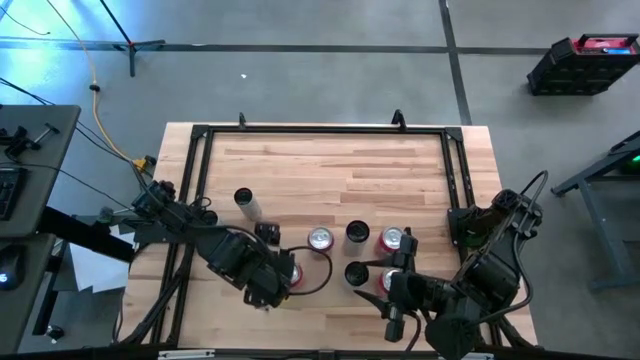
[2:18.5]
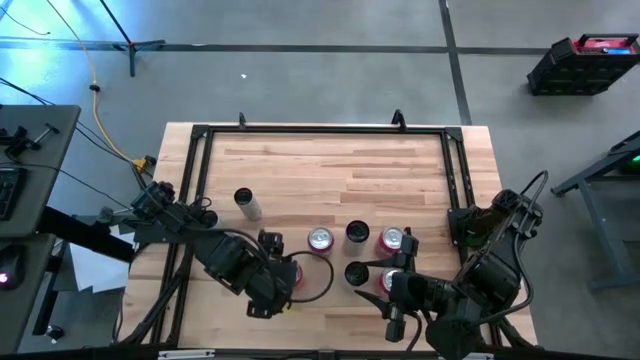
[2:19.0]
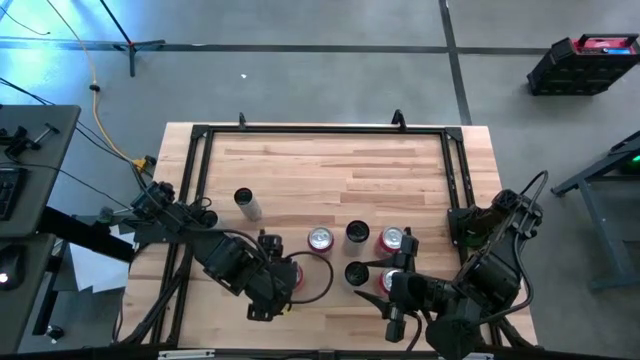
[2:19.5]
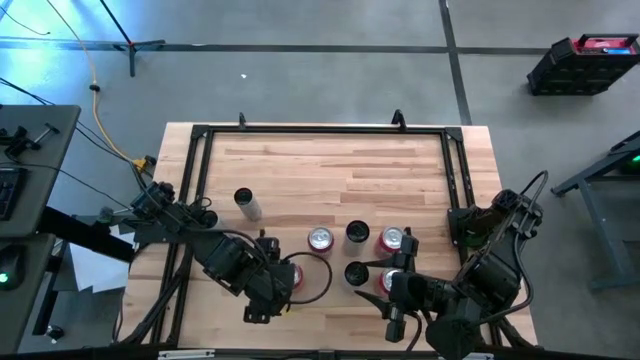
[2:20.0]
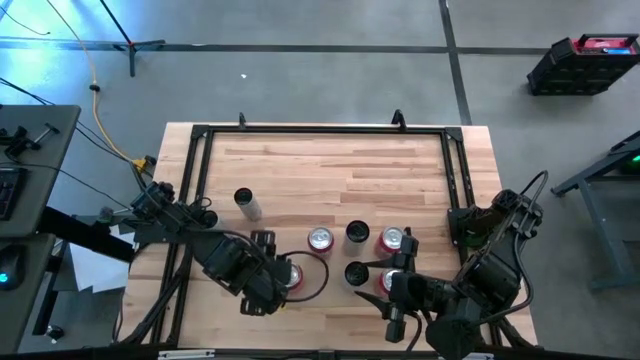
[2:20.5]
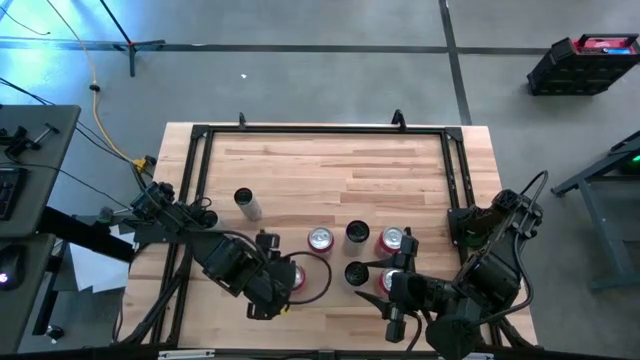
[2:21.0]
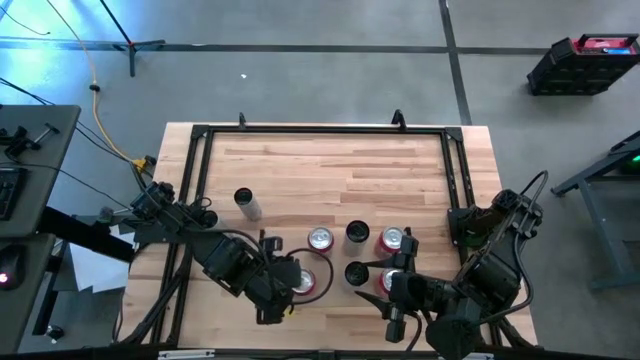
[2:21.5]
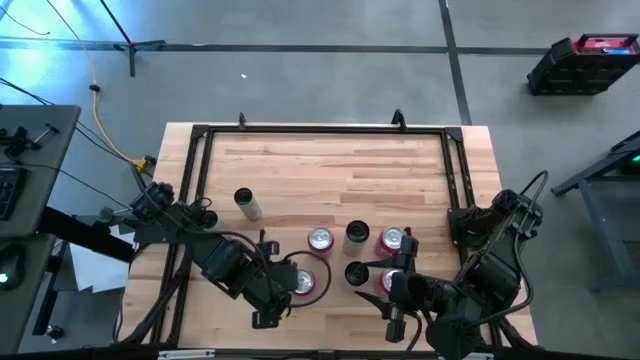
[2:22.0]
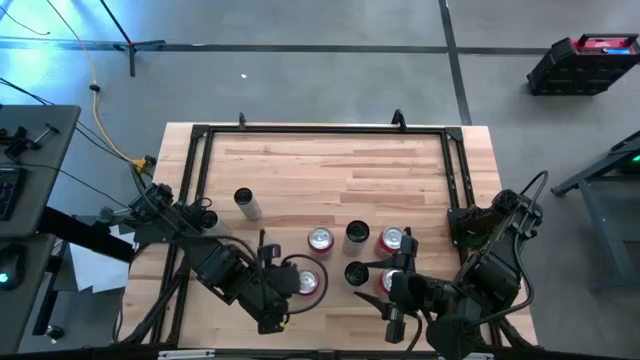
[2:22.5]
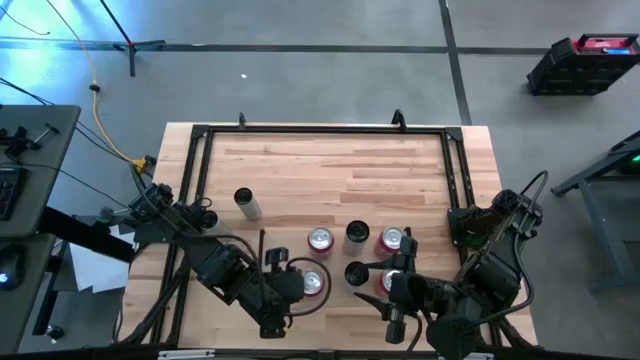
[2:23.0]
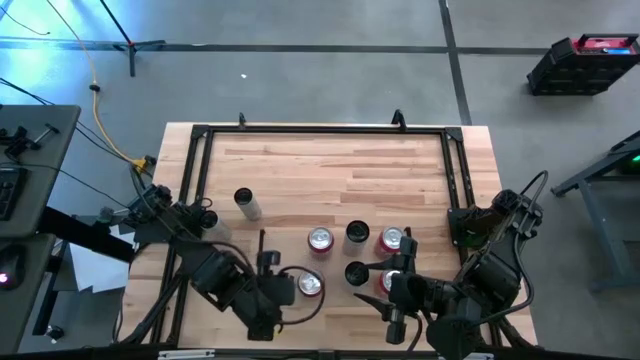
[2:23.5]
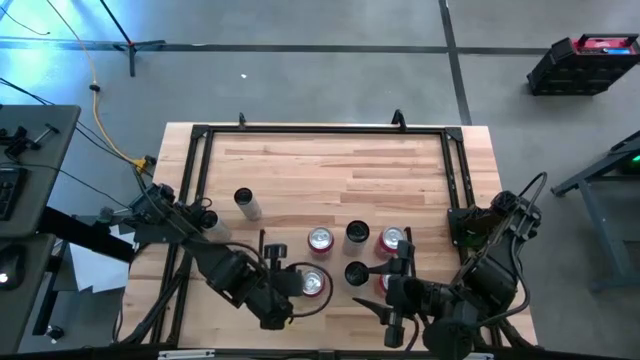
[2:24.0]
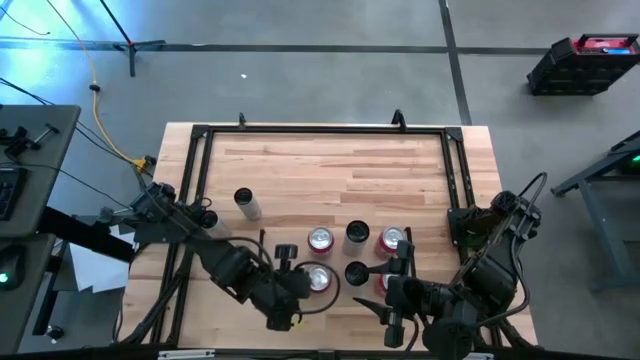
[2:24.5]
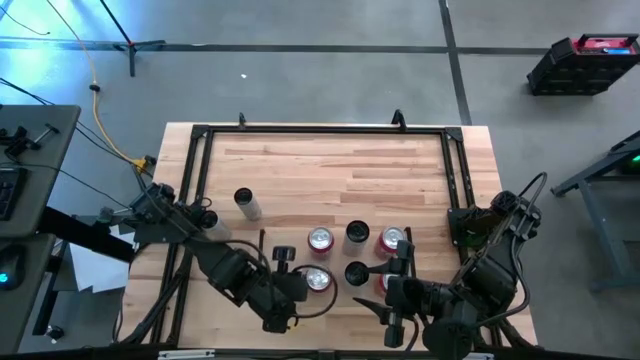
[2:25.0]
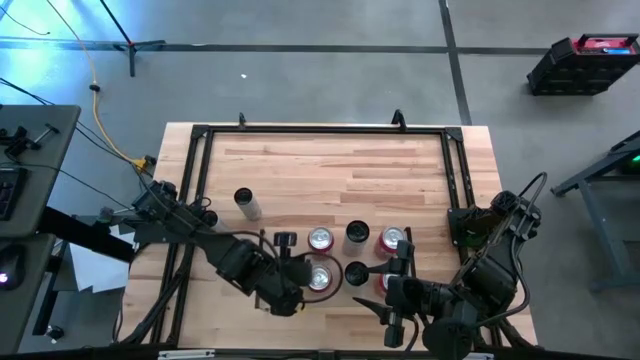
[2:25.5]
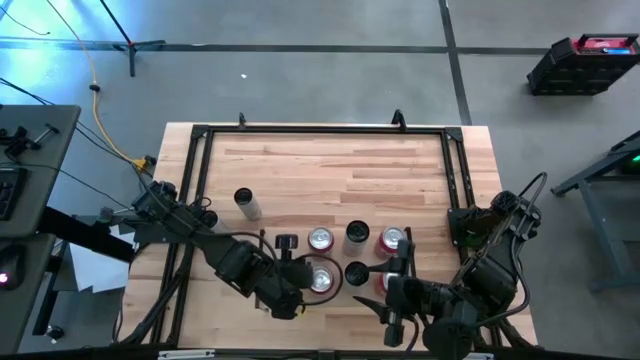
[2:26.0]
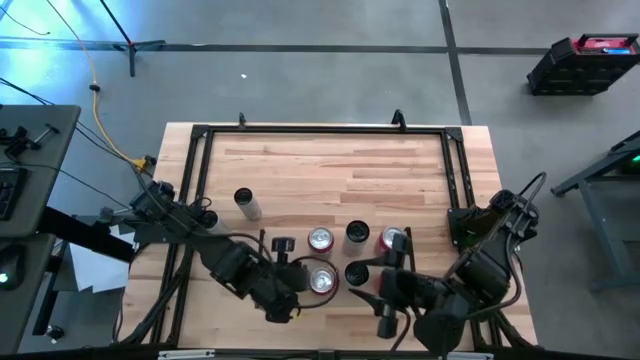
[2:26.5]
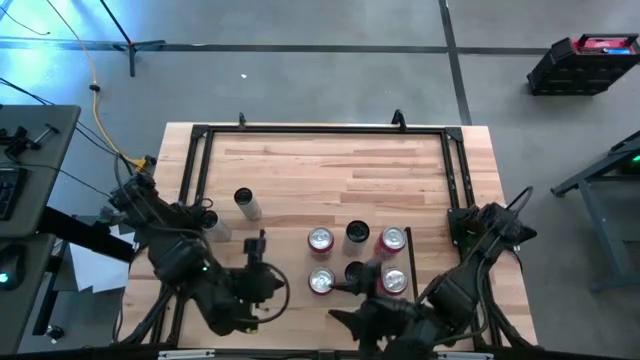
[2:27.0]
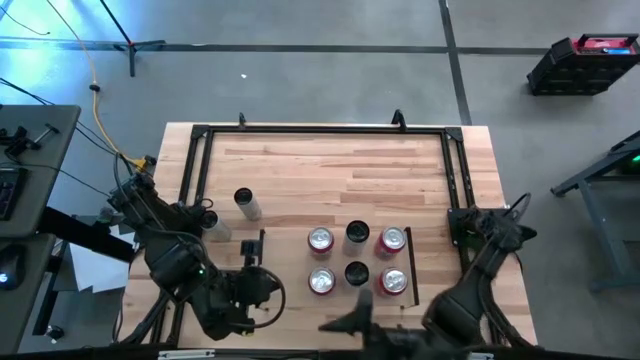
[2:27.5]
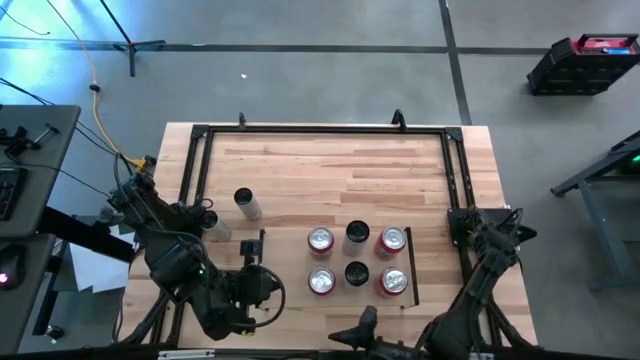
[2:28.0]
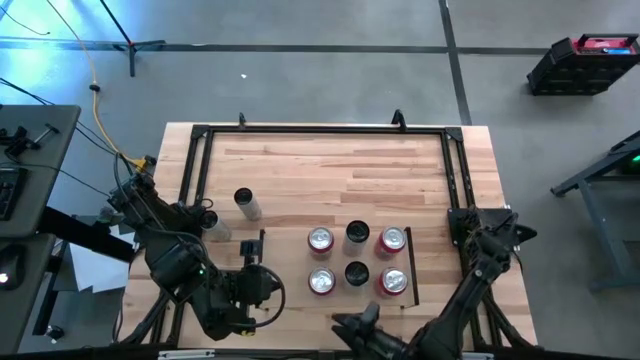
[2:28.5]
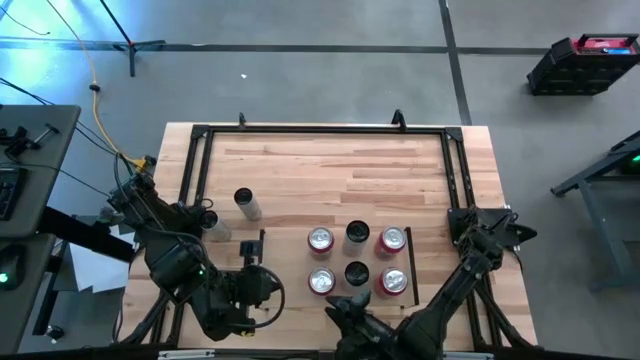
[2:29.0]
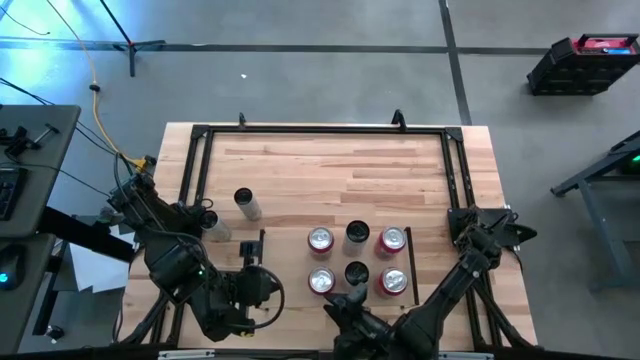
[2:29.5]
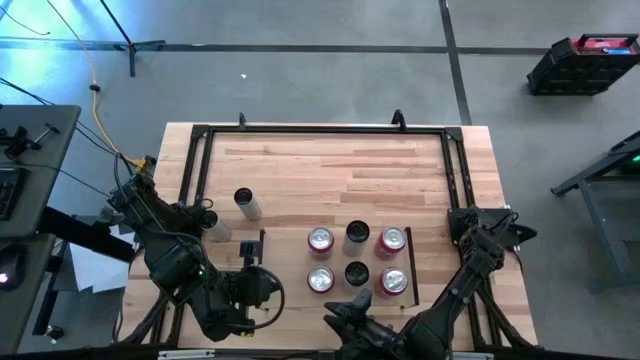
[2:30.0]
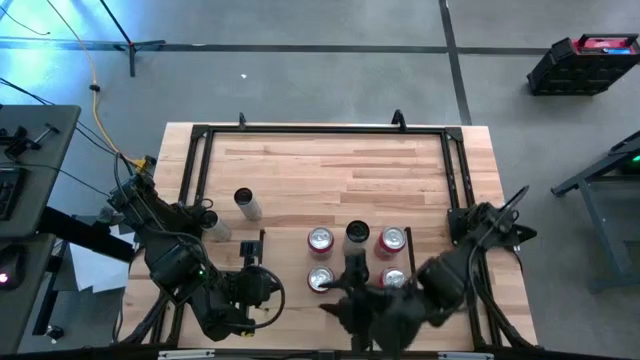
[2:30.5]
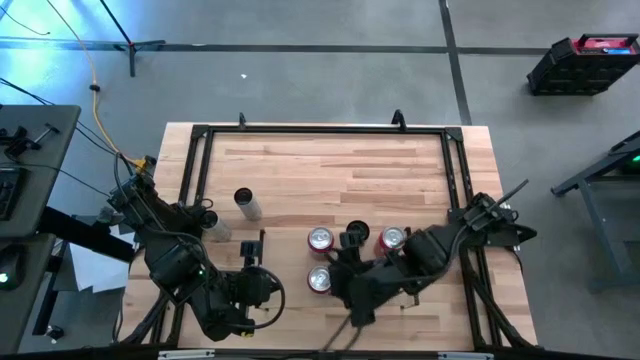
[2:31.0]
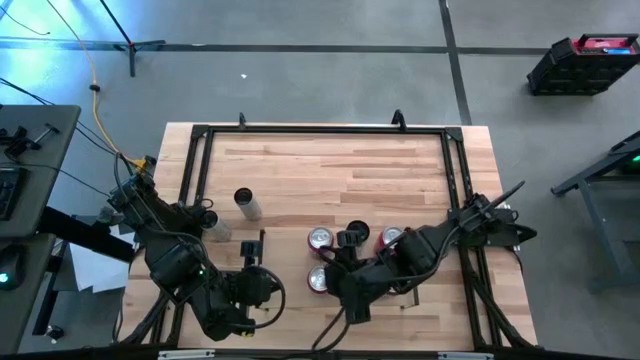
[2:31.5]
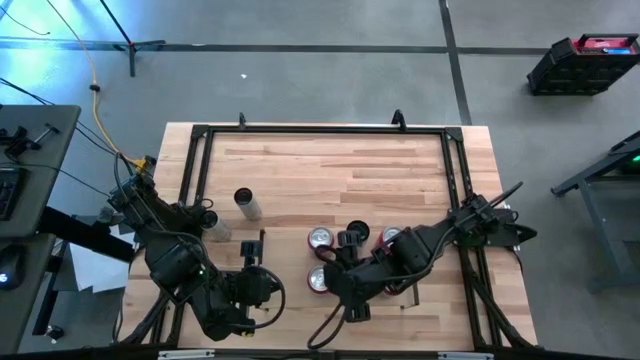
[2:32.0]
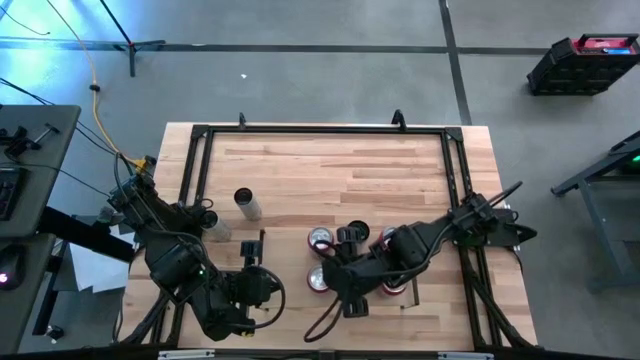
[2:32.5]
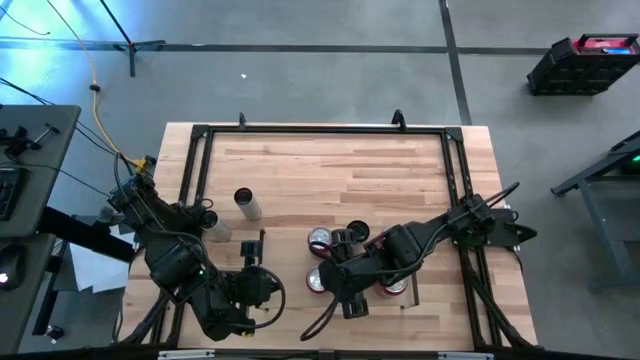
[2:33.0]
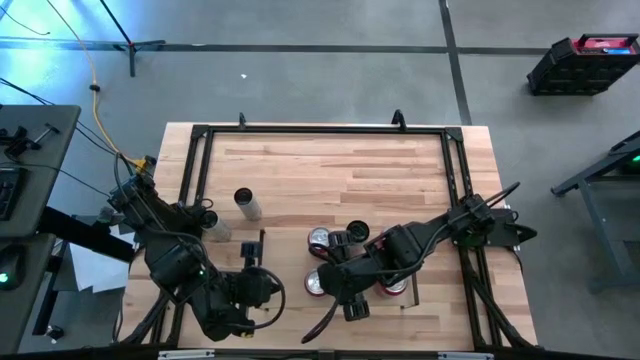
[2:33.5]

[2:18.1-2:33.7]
Task: Place canned beverage on shelf
Put the red soda can on the shelf

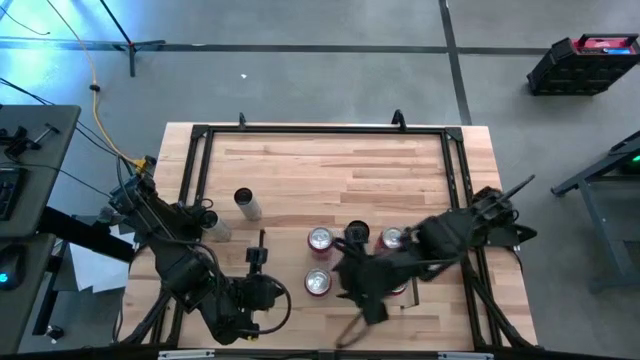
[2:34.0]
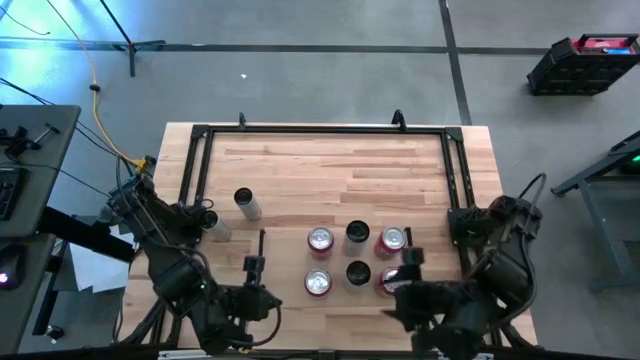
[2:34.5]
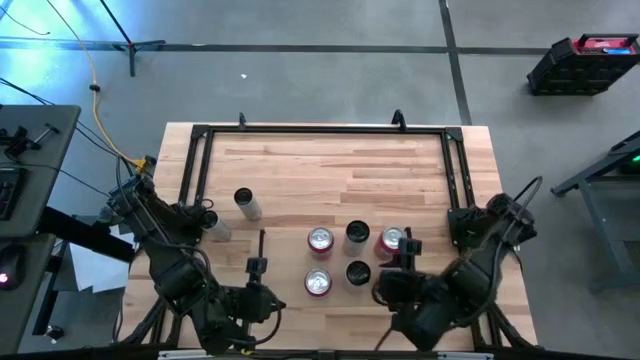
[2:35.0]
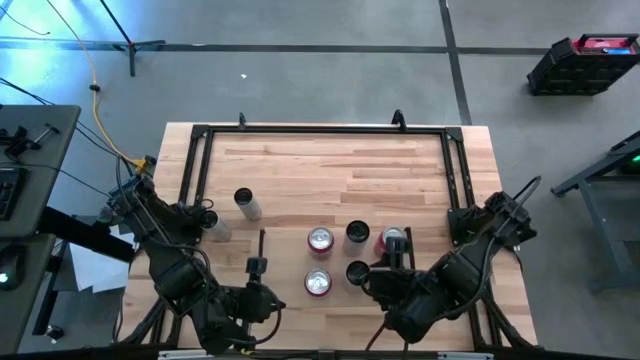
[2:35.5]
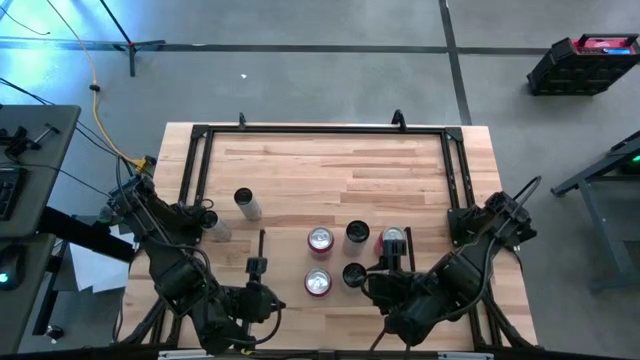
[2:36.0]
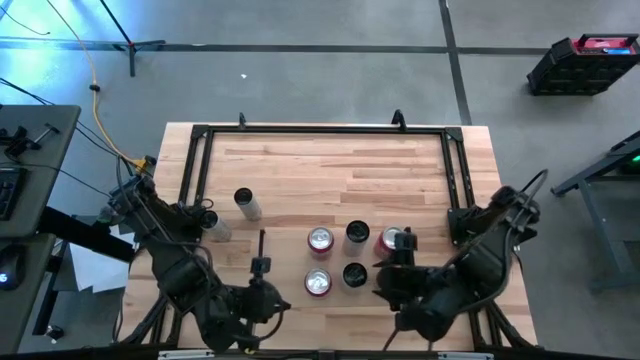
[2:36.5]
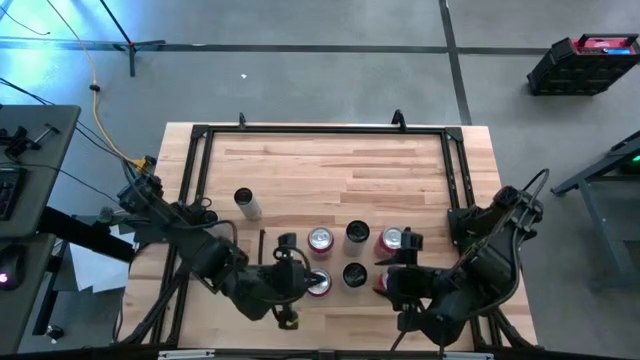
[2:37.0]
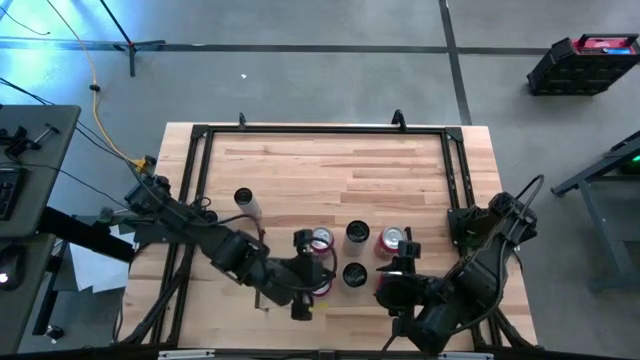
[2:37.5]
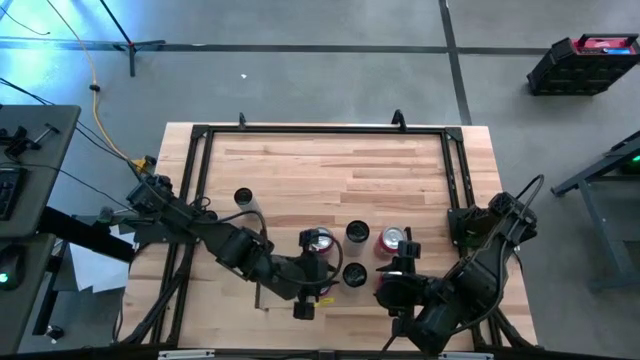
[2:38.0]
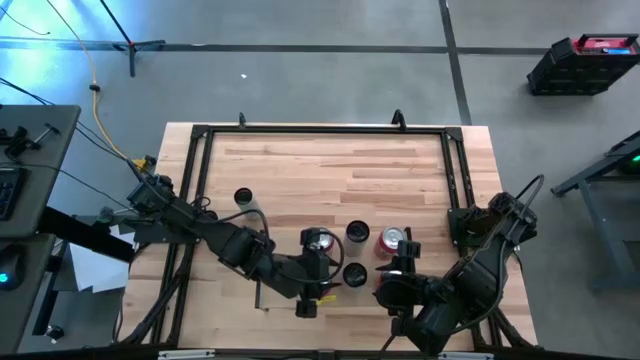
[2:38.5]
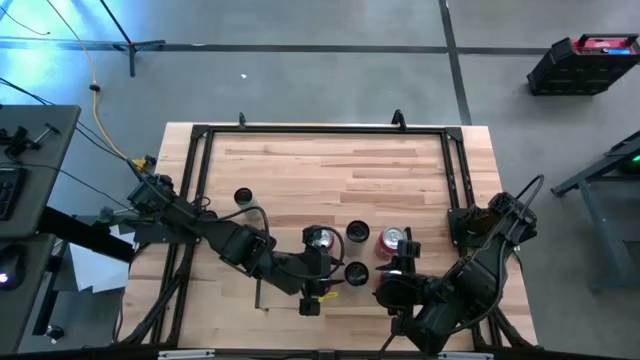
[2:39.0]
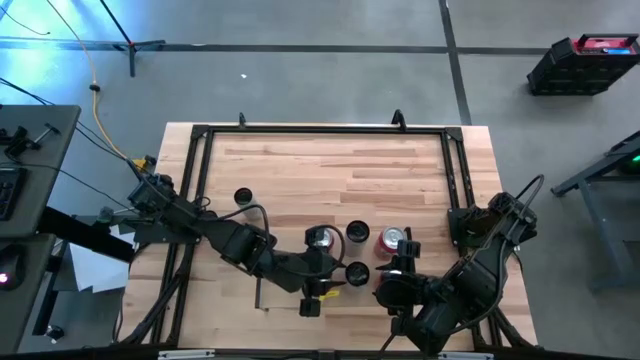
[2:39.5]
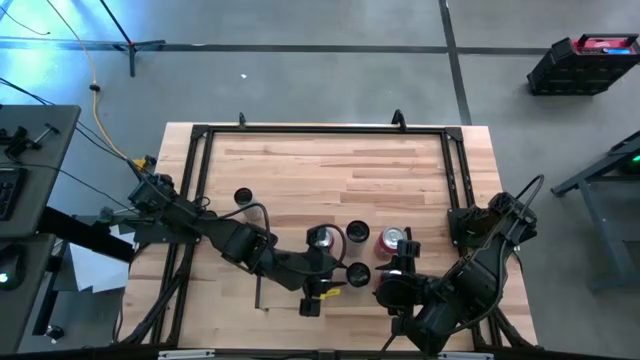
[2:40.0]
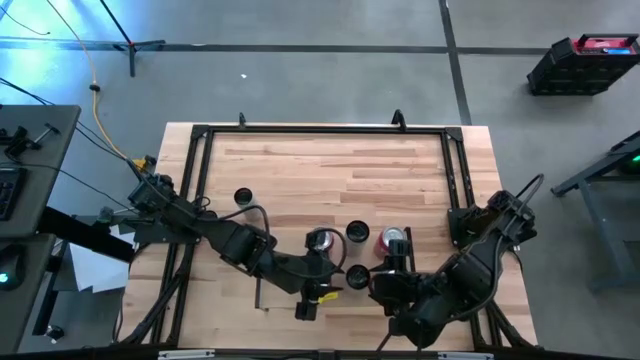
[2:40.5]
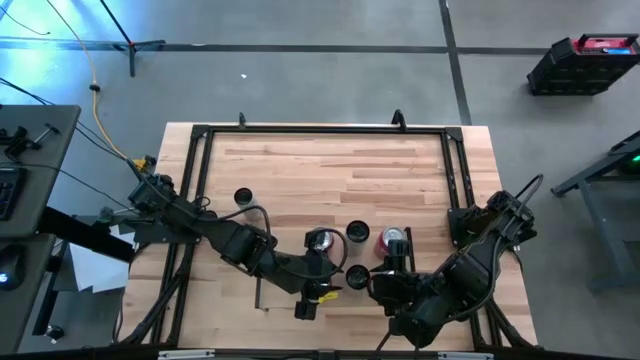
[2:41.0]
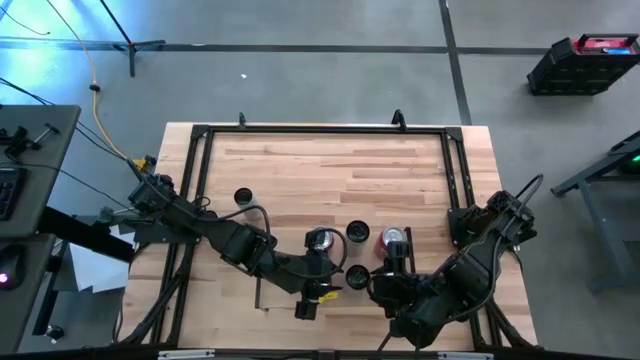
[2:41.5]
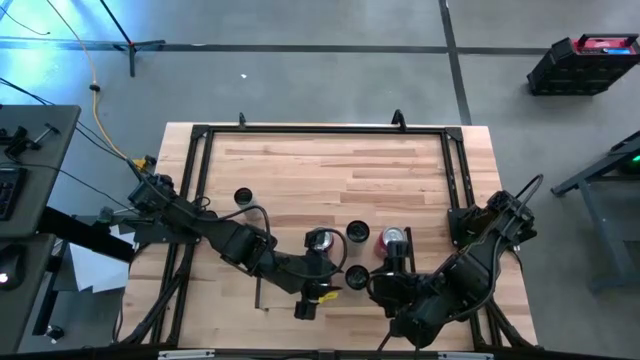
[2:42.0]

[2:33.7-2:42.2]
Adjust the white yellow soda can on the shelf
